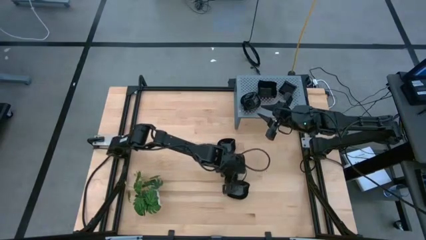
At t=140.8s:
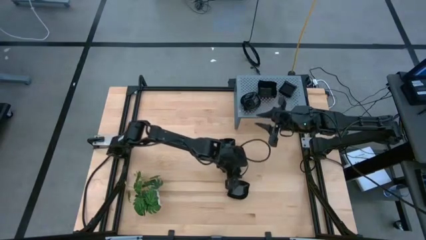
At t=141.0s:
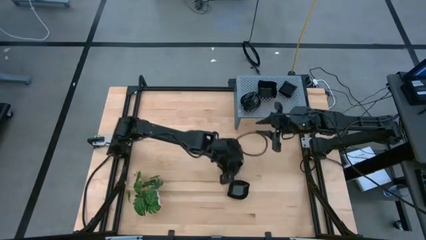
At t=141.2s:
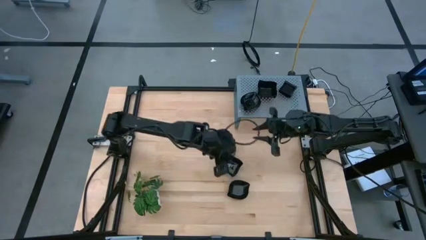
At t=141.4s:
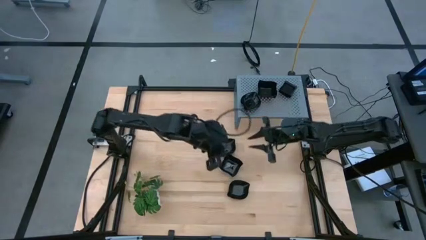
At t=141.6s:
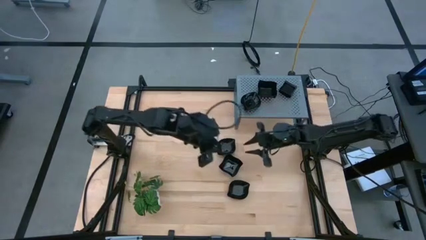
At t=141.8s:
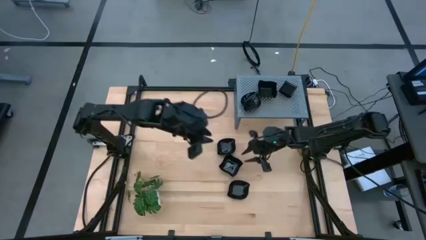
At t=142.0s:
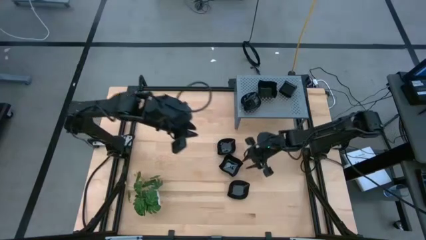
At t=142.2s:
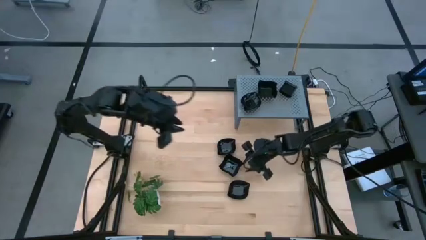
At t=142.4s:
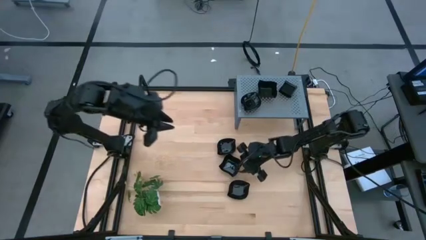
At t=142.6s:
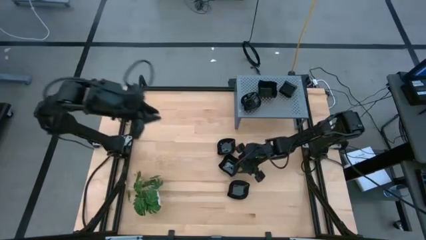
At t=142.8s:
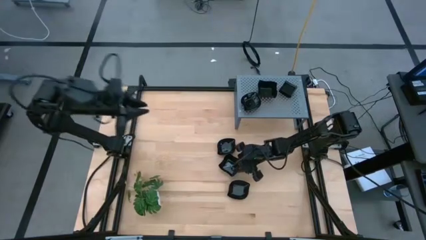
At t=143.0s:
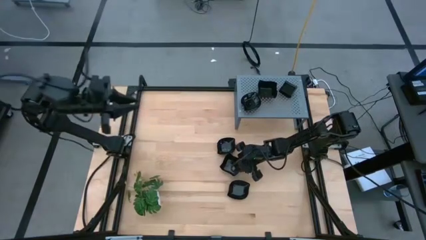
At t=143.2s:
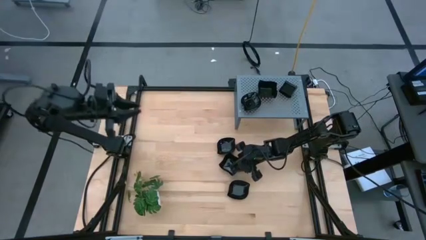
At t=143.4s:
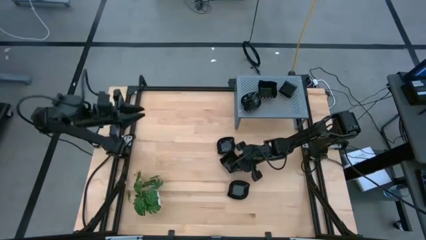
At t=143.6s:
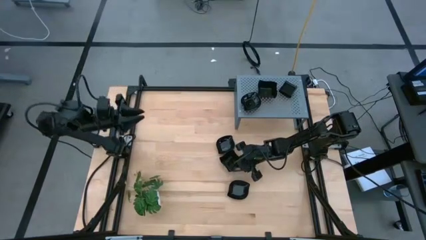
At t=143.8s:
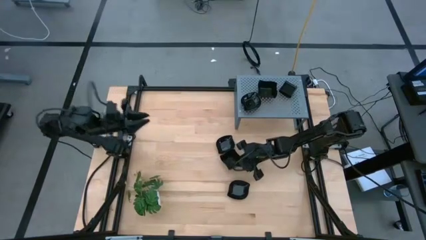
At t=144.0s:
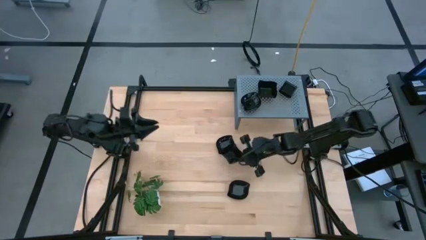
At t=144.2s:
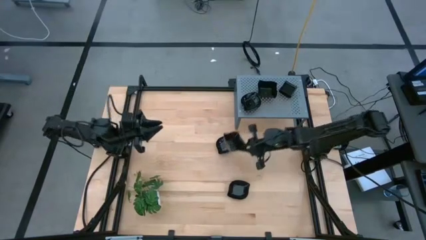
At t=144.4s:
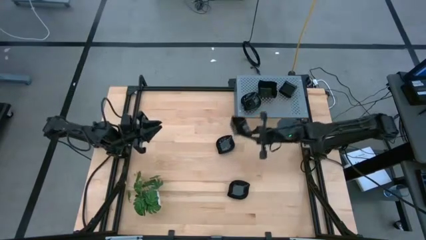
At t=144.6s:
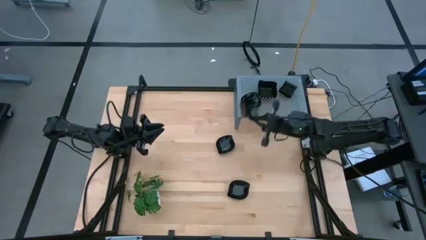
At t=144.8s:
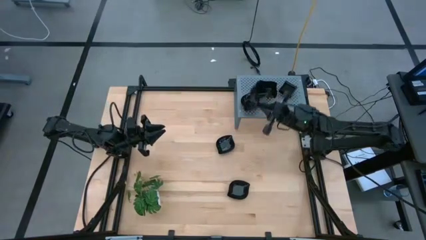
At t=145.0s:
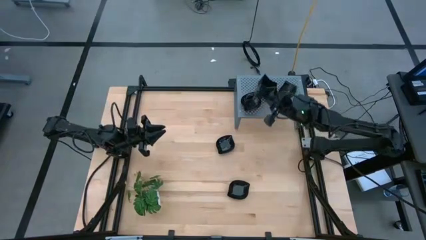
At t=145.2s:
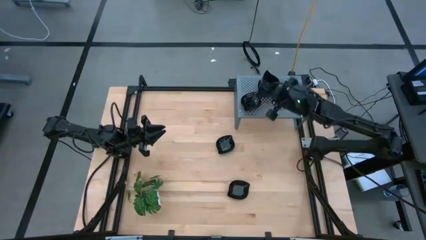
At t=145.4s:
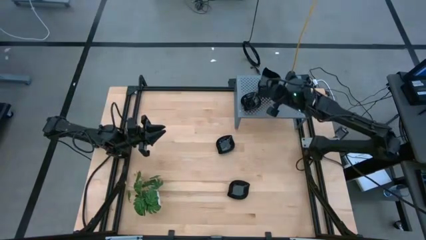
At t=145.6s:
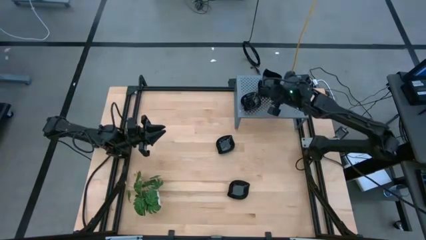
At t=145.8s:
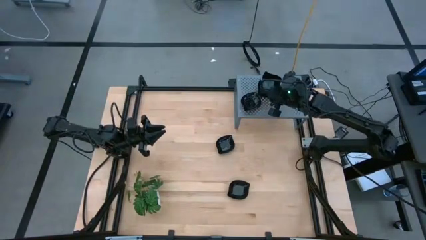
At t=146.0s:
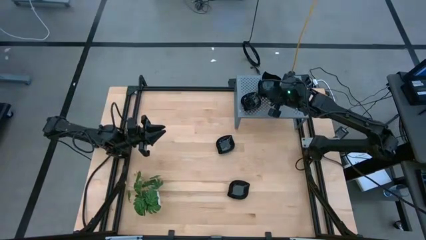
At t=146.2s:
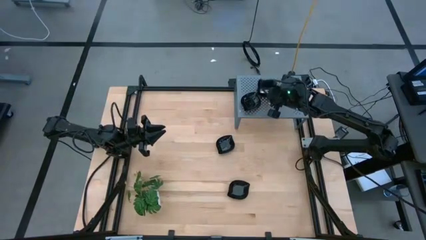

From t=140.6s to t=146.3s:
Task: Pick & Place Mini shaped plates
Stack the distorted square plate on the distorted square plates on the shelf

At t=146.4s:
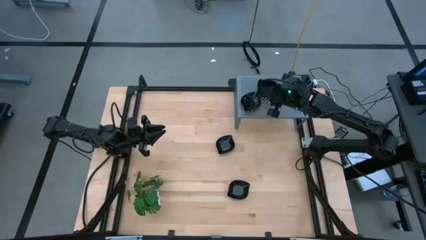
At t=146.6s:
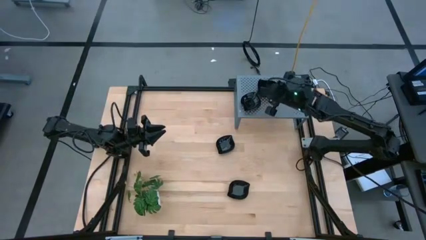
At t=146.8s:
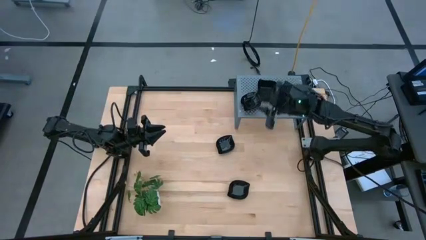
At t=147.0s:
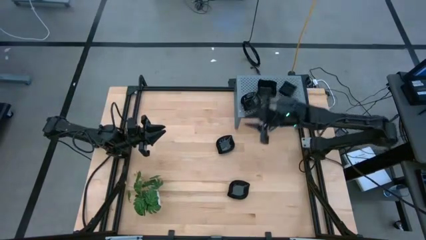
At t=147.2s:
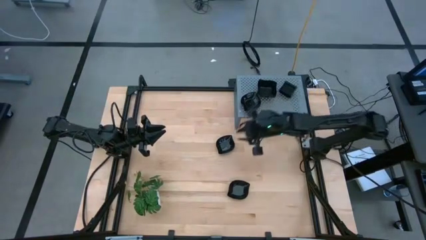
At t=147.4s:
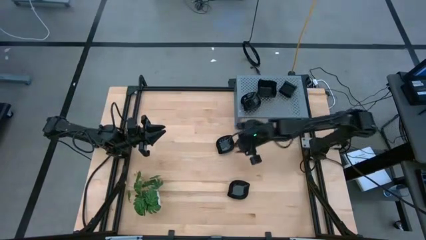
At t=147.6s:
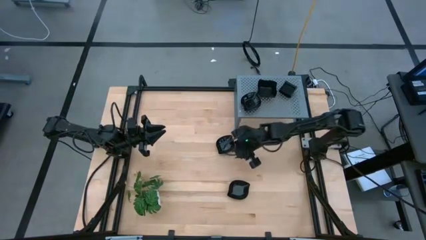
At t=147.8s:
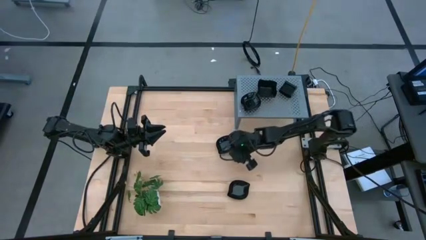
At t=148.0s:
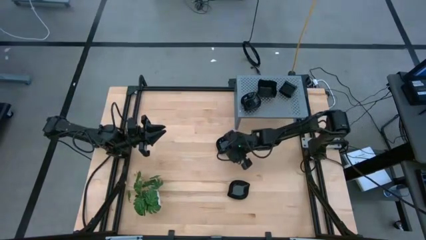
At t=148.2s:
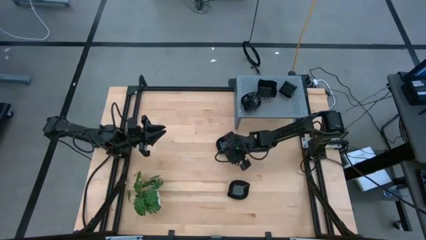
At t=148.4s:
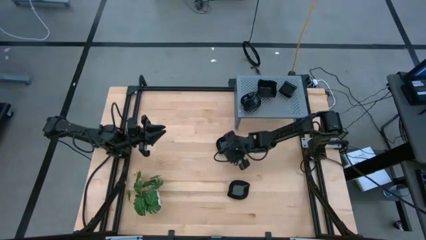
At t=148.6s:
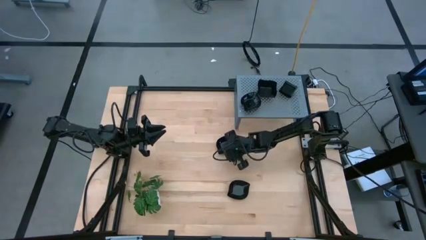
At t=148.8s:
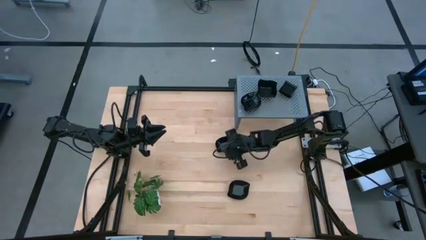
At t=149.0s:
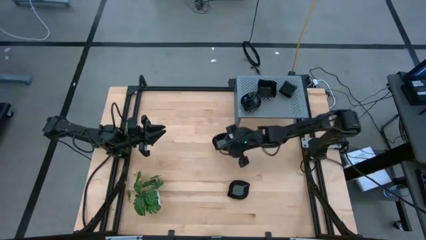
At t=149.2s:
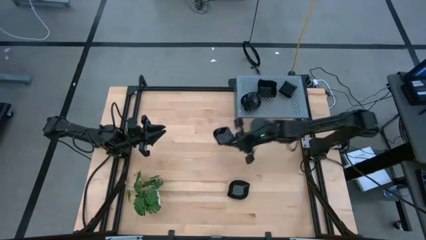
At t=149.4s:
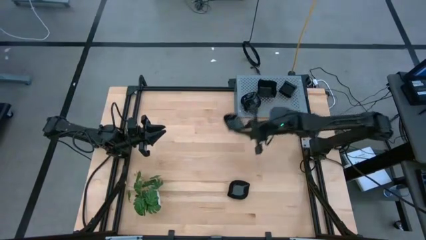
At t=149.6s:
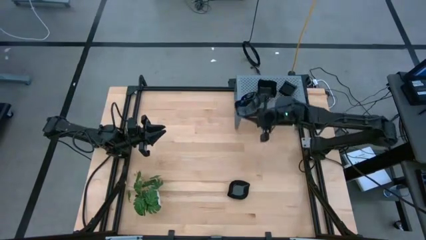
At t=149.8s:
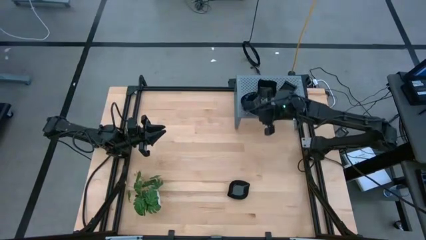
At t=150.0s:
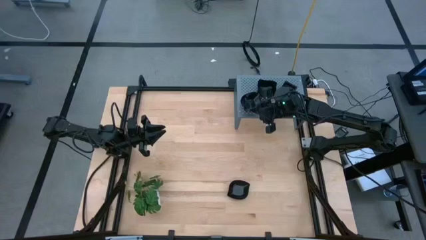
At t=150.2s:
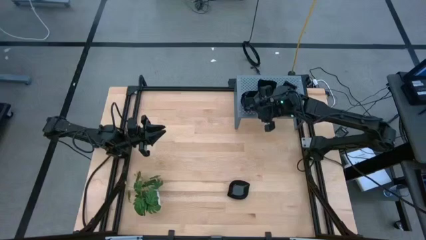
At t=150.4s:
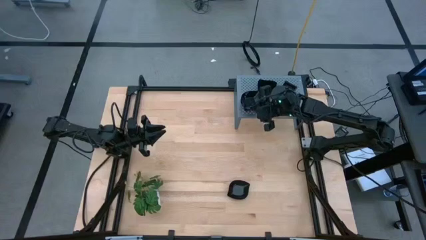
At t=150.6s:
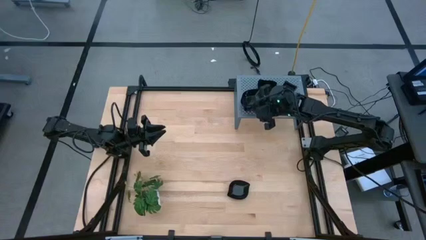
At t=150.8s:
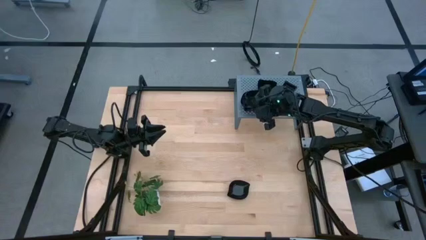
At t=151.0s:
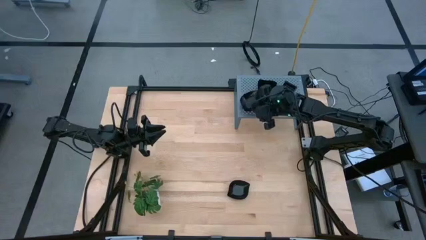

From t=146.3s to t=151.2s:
Stack the leaf-shaped plate on the leaf-shaped plates on the shelf

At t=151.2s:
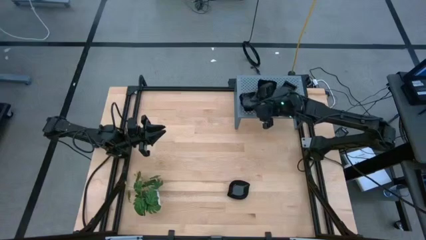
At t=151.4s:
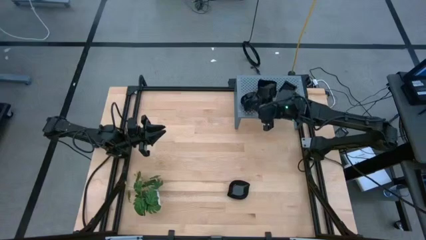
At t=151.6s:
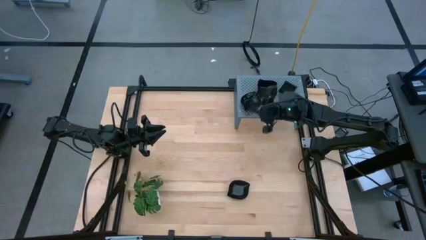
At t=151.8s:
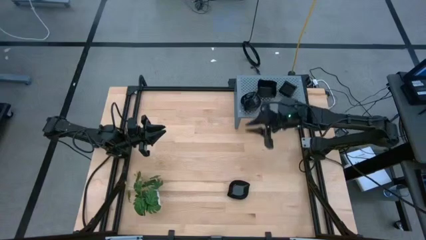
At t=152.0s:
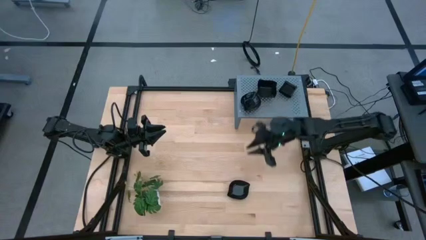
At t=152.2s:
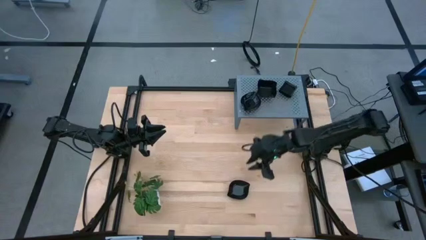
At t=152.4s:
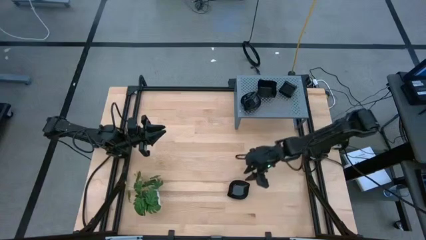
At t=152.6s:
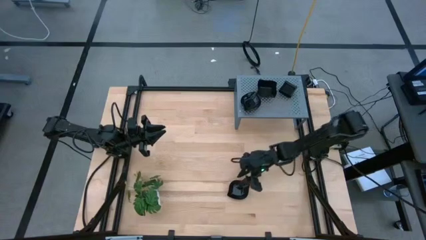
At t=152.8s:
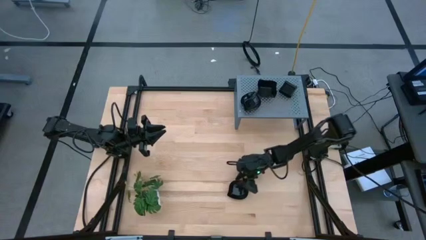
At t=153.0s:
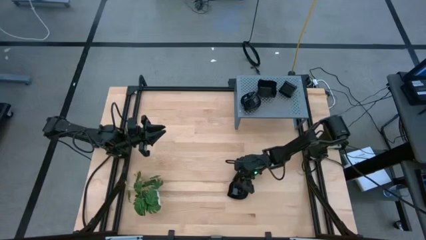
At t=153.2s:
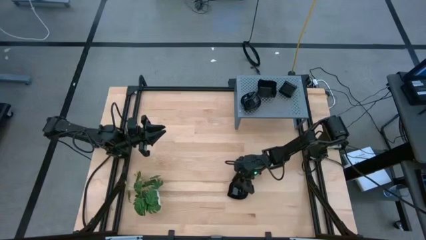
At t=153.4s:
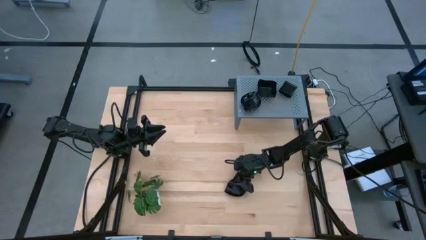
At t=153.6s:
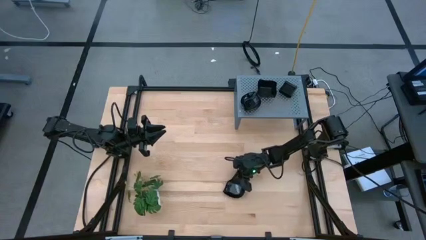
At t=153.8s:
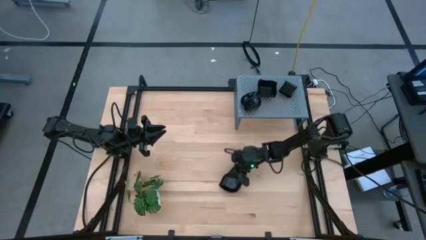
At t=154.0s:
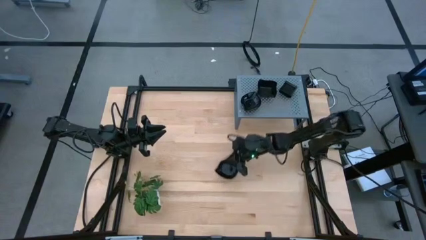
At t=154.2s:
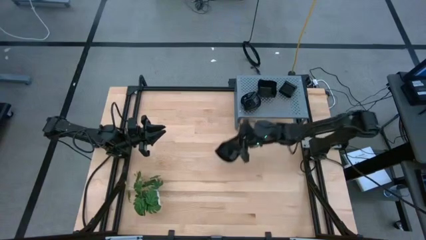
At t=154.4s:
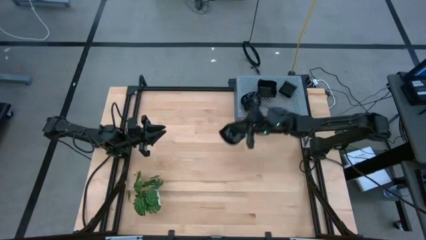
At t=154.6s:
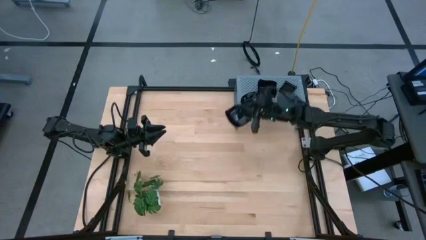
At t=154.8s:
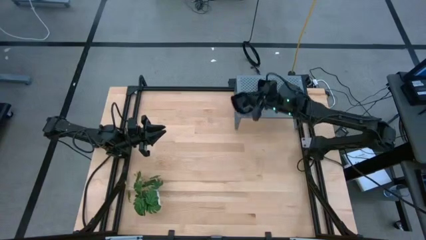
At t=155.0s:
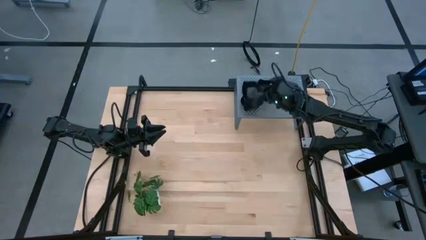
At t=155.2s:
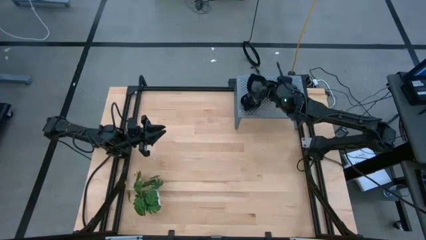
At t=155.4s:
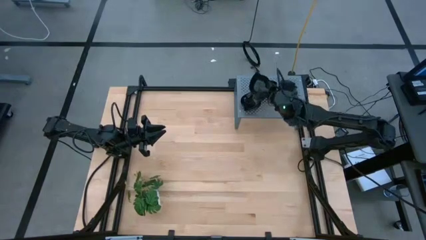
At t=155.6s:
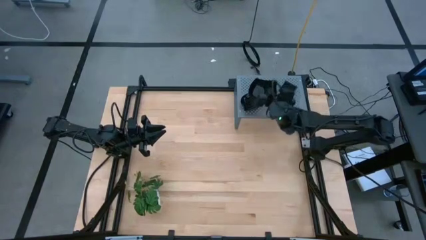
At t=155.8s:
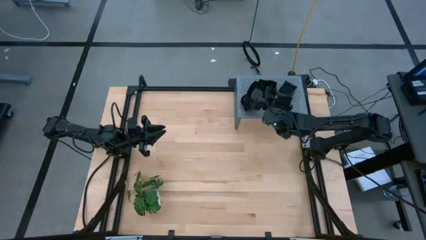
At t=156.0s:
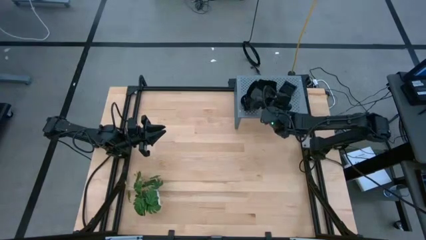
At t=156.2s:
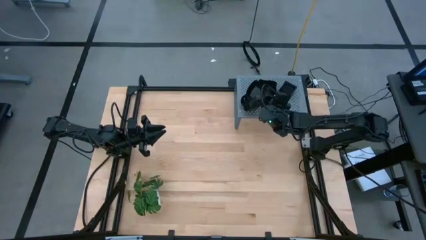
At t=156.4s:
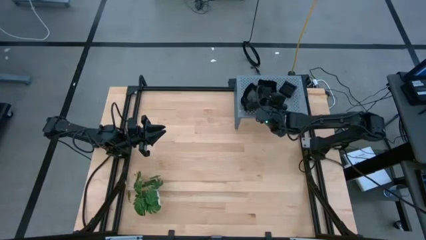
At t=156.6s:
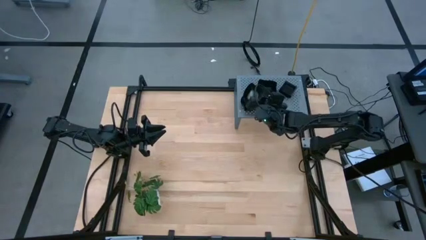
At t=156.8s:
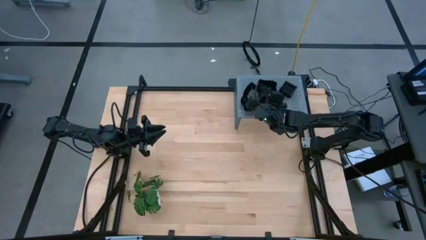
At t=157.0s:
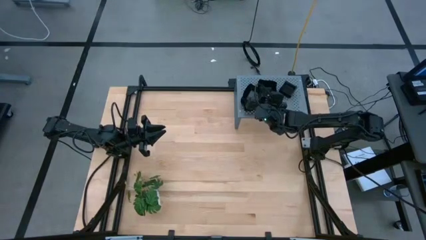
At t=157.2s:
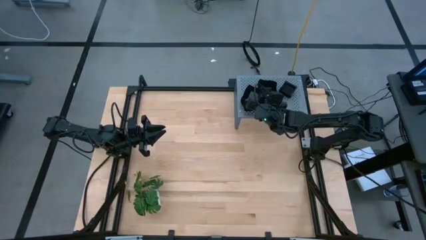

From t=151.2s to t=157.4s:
Stack the leaf-shaped plate on the leaf-shaped plates on the shelf
